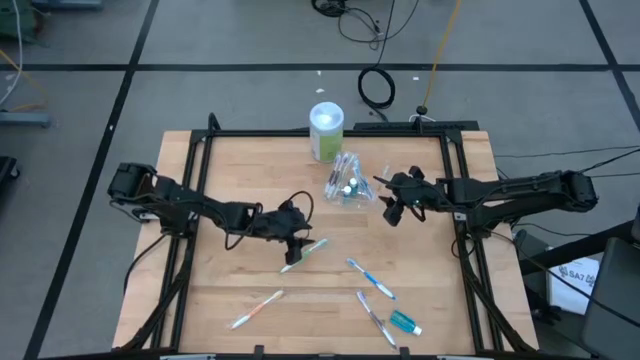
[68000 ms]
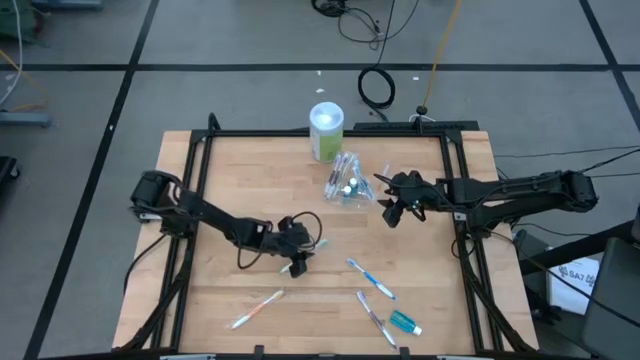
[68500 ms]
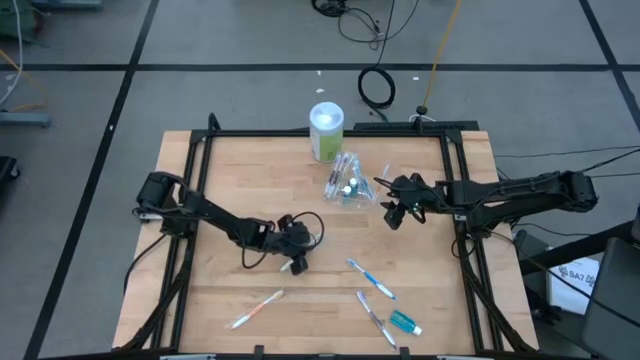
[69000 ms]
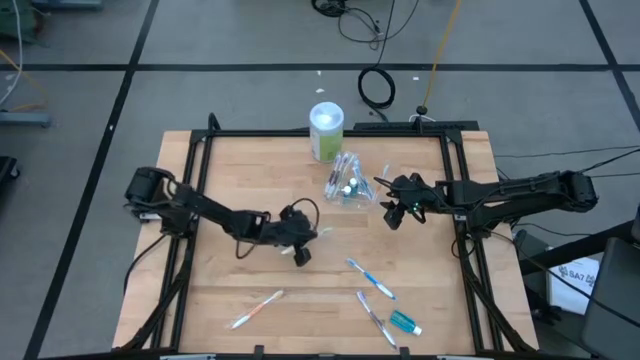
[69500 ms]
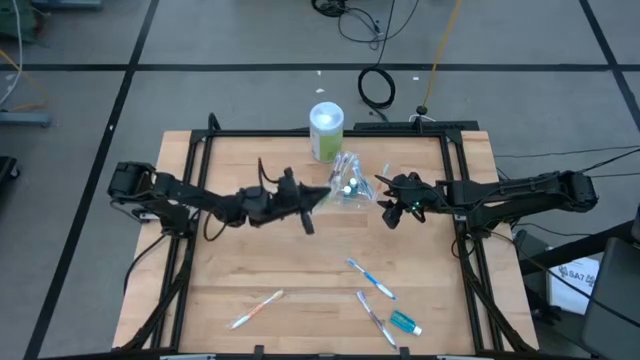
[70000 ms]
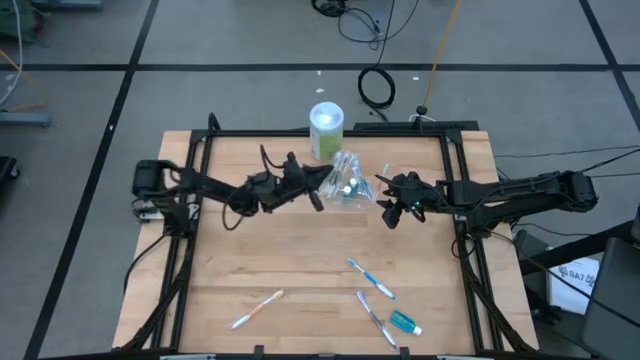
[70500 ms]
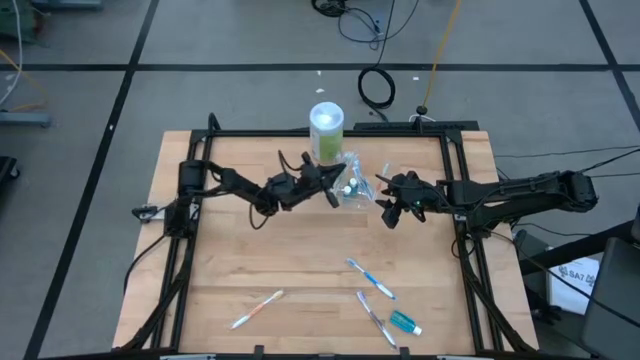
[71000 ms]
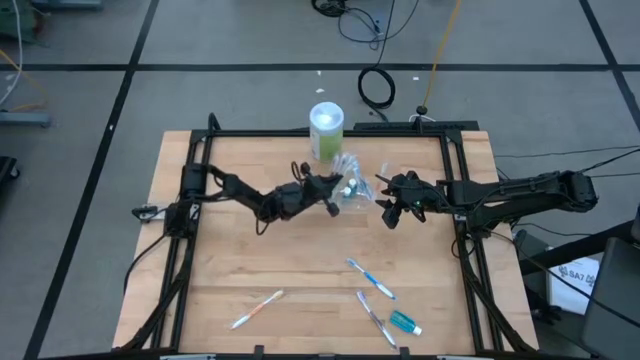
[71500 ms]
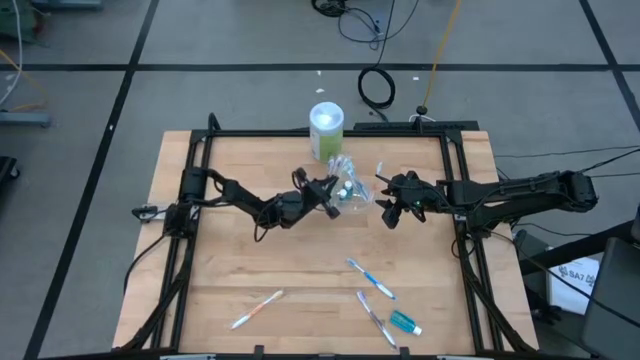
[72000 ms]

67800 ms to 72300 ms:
Task: Pick & Place toothbrushing station
Put the green toothbrush into the transparent organizer

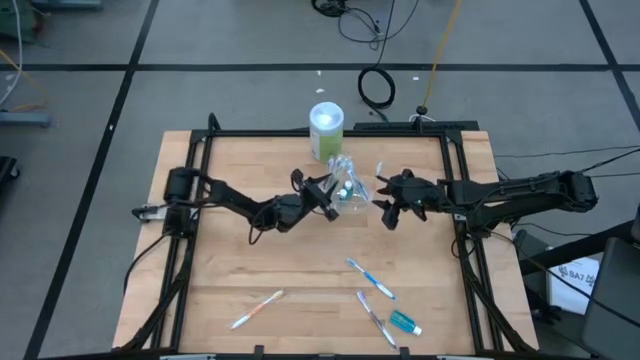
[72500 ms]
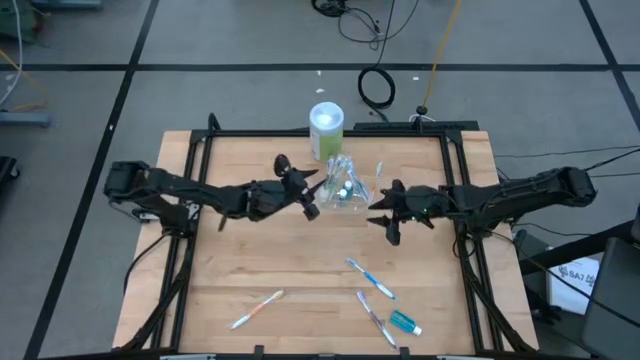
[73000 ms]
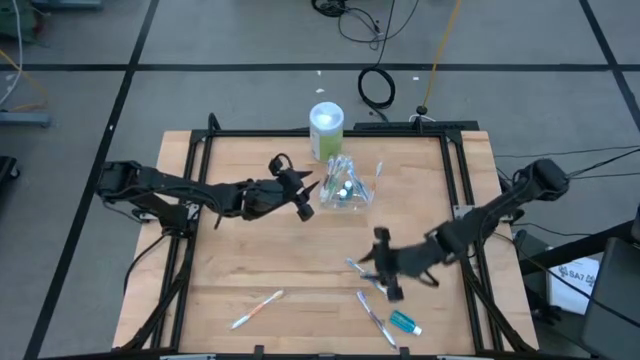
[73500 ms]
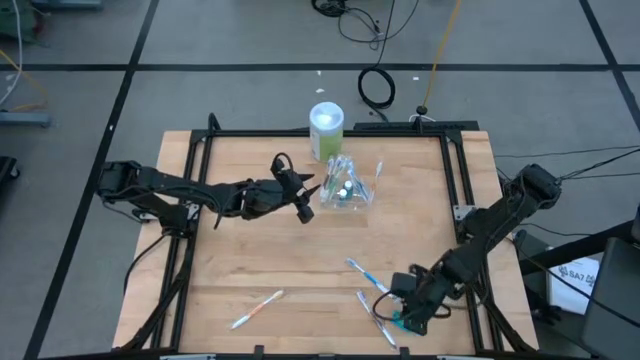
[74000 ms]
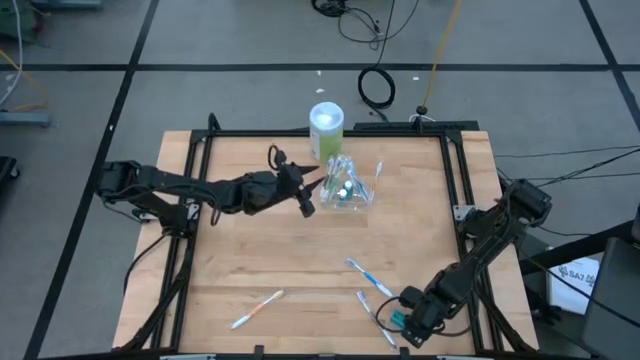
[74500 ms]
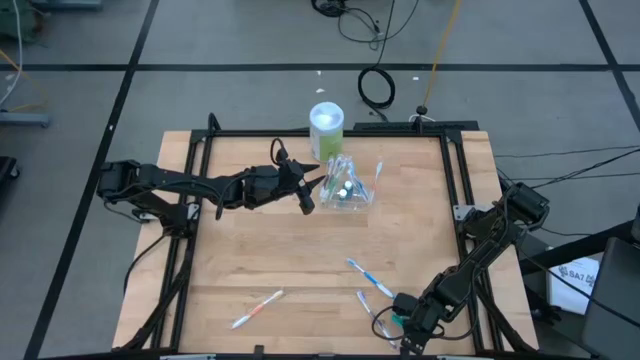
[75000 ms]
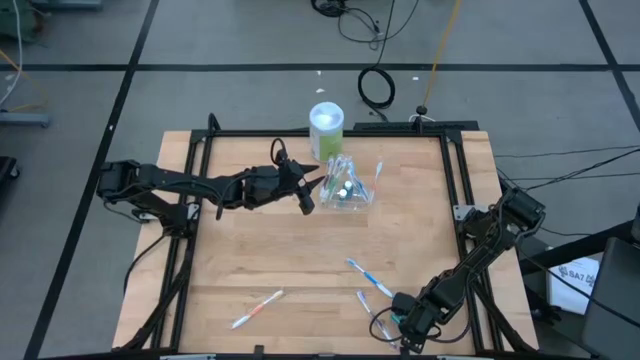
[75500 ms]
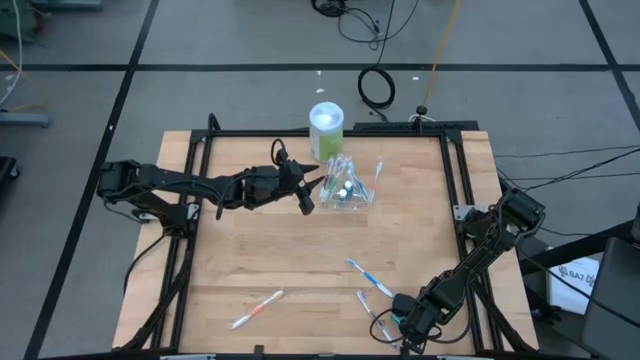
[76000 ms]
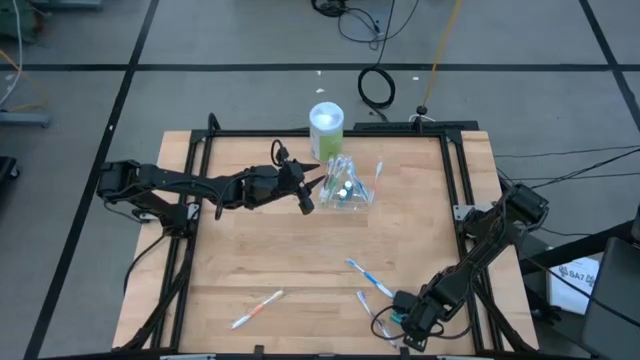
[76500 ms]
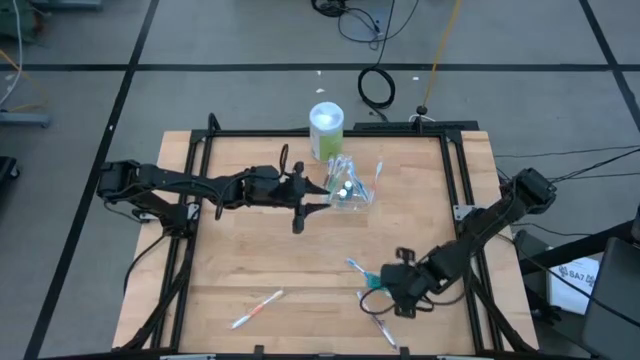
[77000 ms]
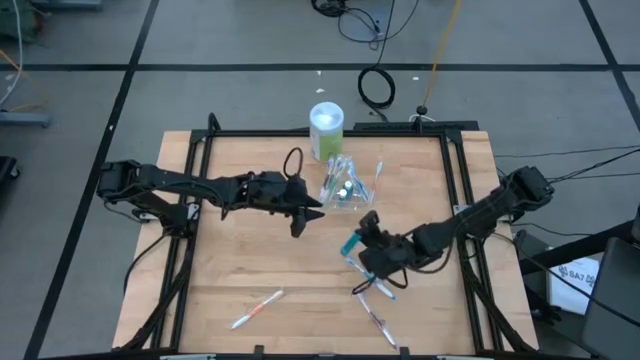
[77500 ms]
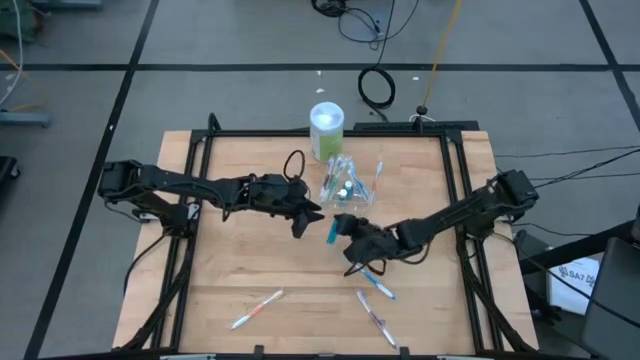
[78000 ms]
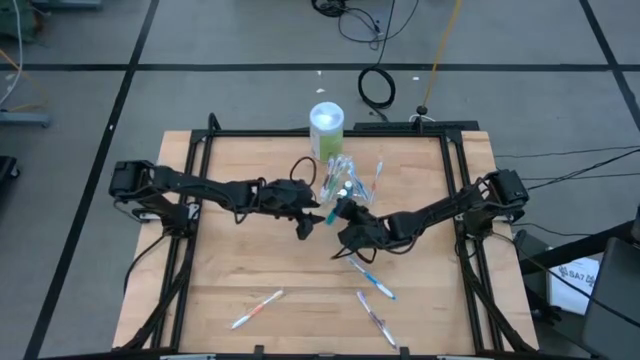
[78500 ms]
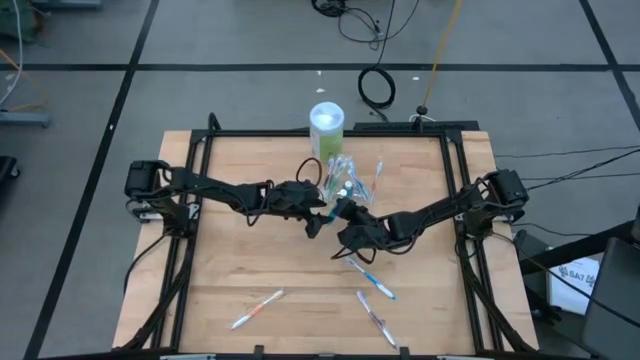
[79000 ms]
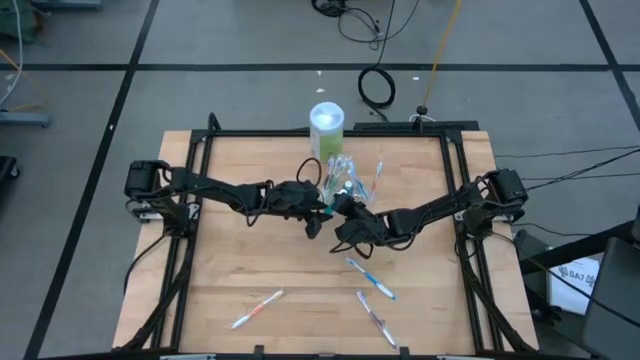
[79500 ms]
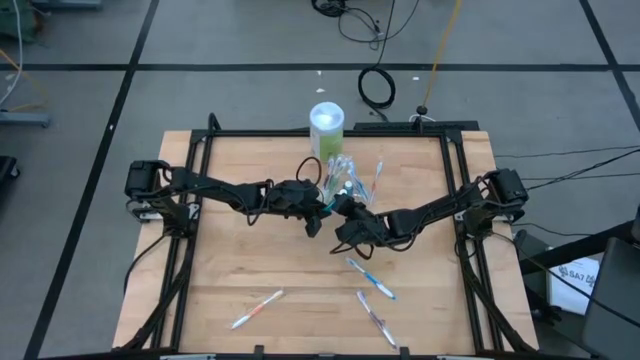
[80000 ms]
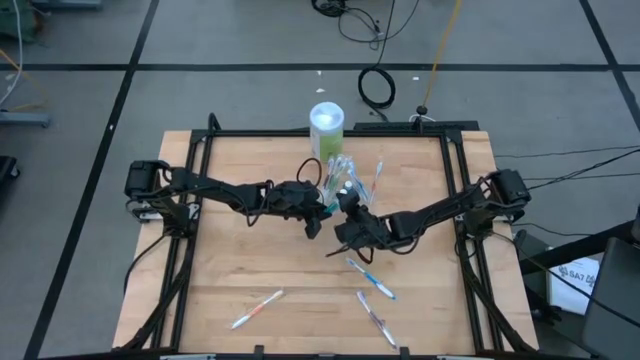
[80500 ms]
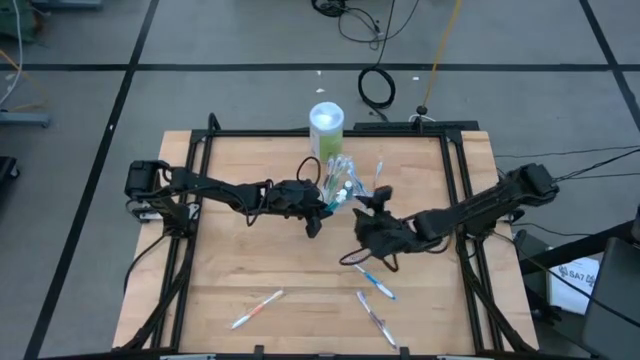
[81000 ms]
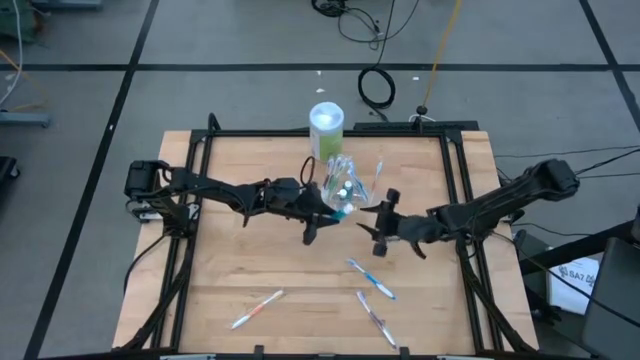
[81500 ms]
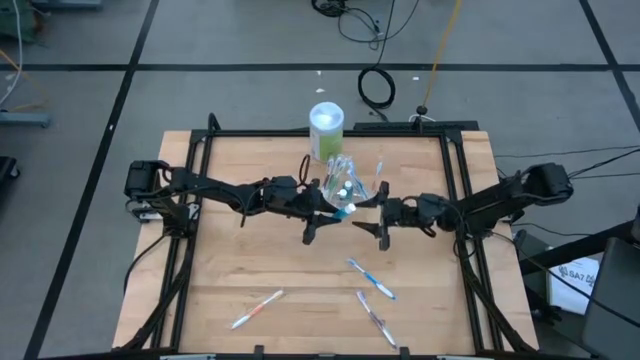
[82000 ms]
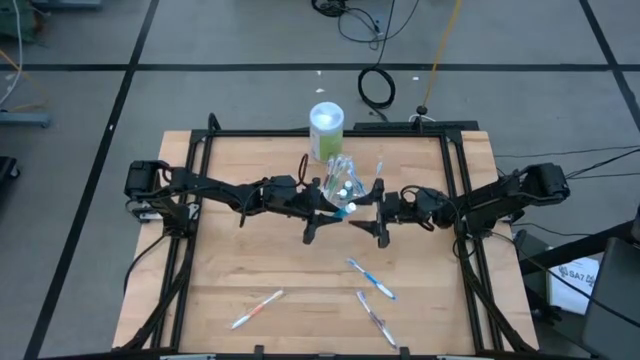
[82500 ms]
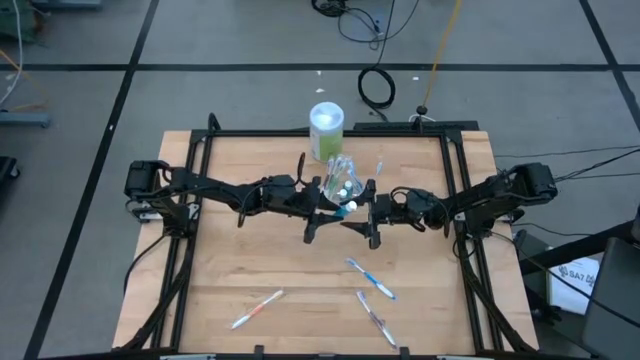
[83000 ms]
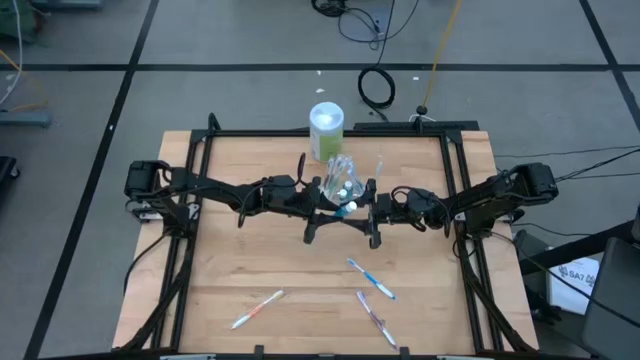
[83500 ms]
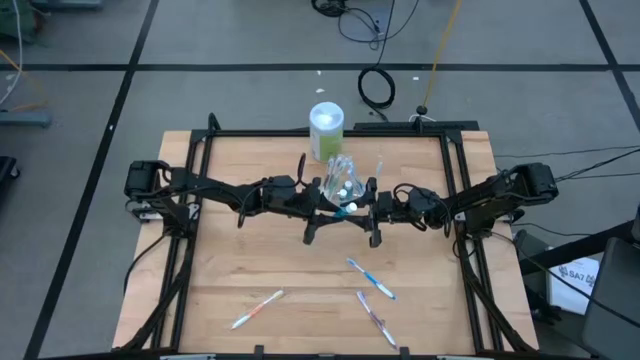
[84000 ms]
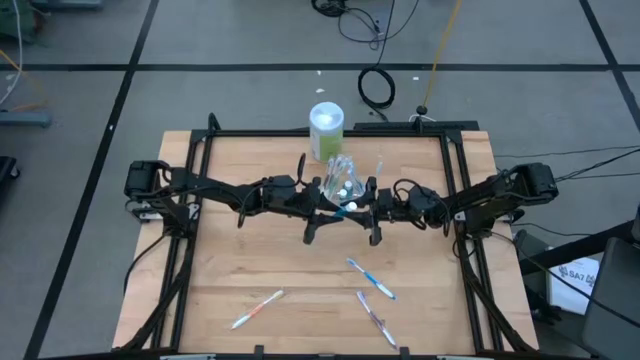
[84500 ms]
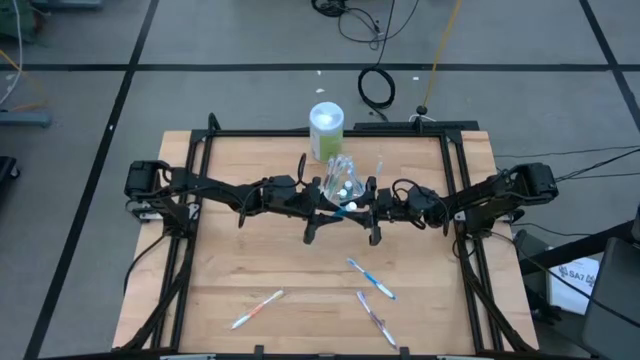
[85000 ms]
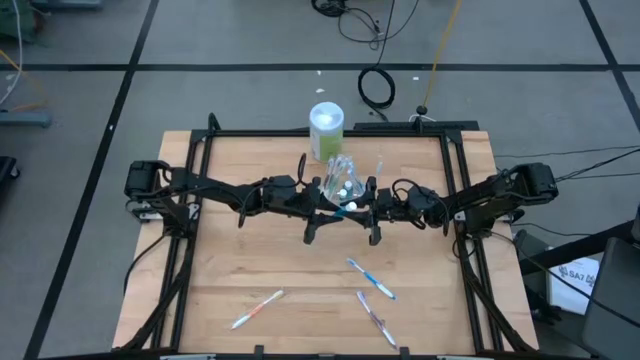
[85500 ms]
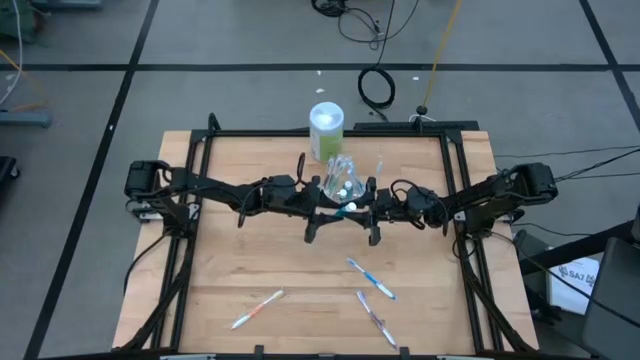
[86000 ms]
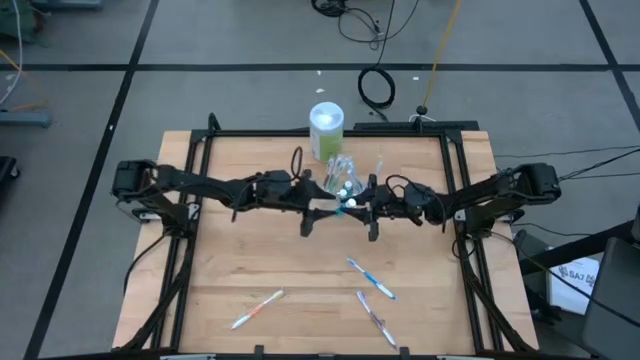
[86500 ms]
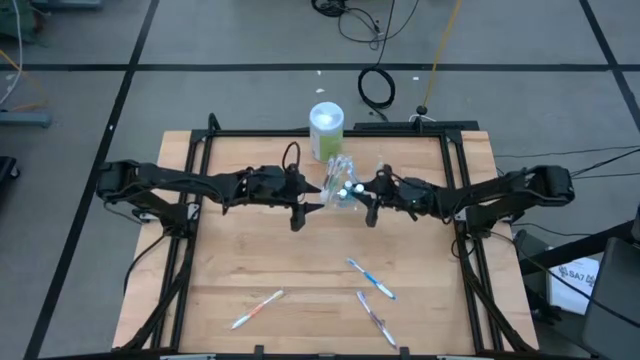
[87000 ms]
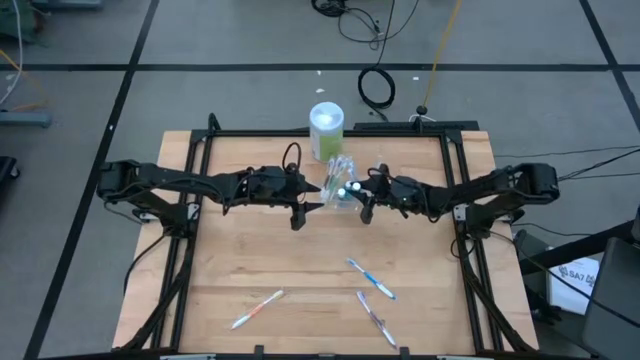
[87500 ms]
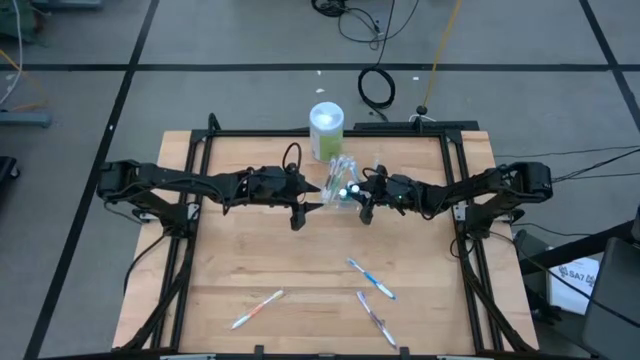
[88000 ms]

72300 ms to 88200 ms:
Put the mouthwash into the transparent organizer

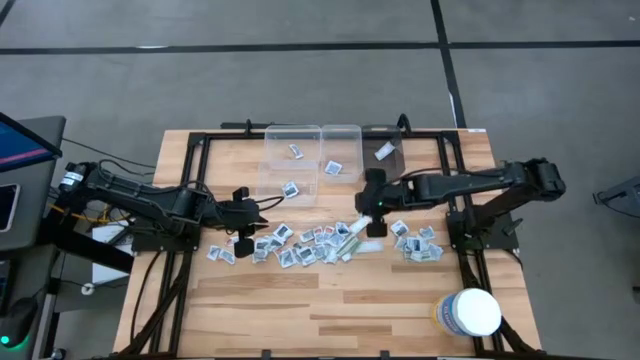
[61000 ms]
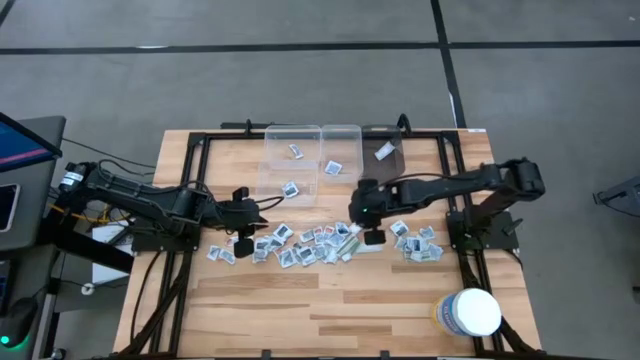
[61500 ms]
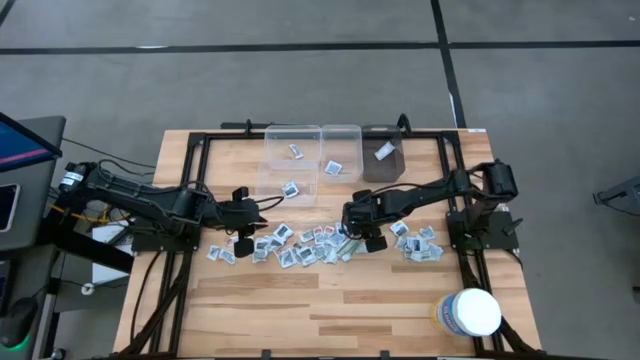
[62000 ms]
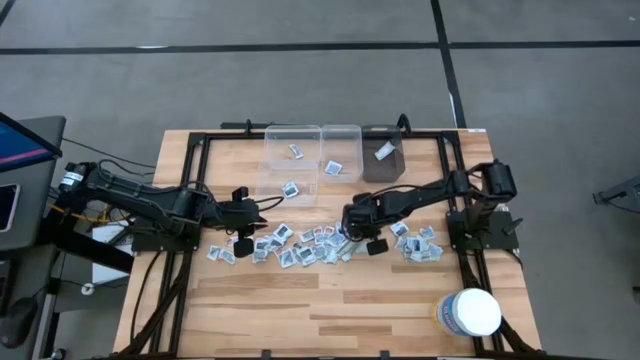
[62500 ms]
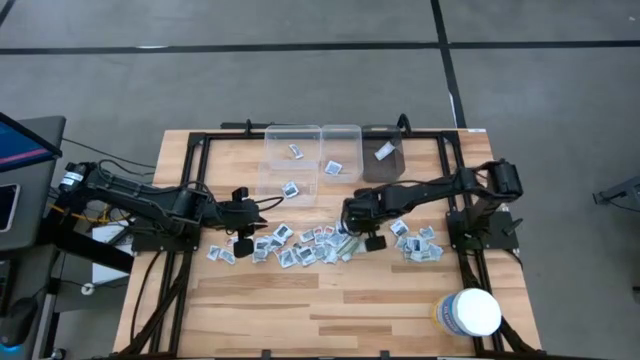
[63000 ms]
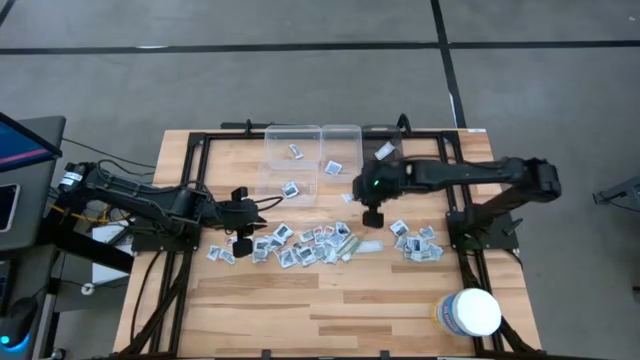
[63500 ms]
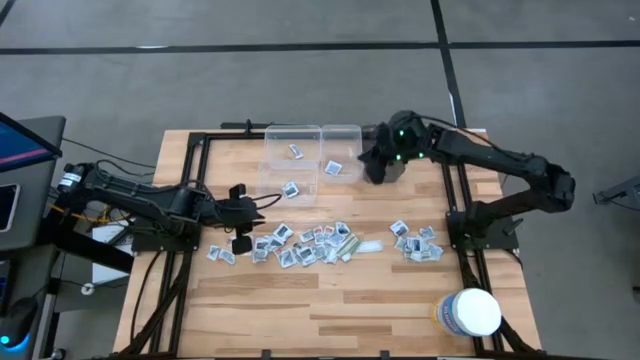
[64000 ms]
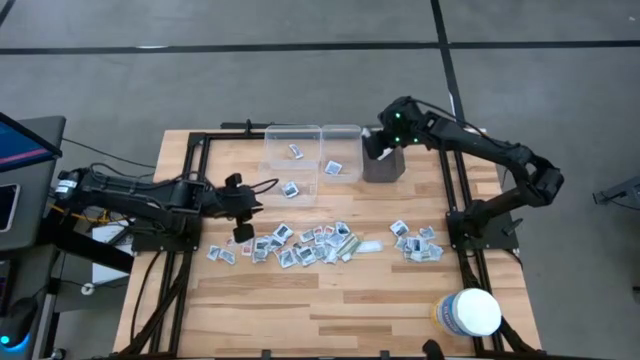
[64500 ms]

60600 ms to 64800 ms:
Task: Pick & Place First Aid Supplies
Put the bandage pack into the black transparent bin
